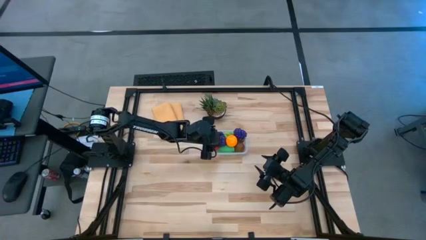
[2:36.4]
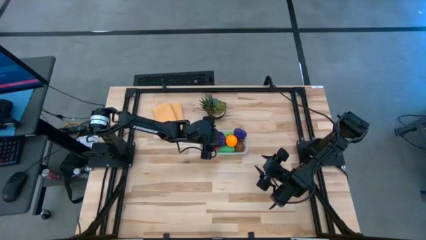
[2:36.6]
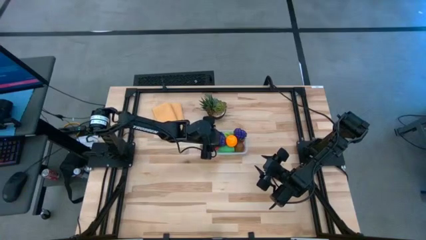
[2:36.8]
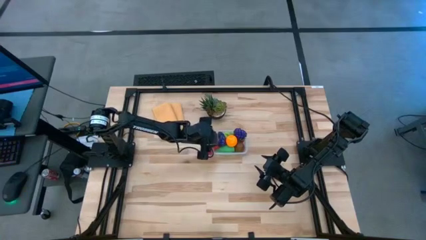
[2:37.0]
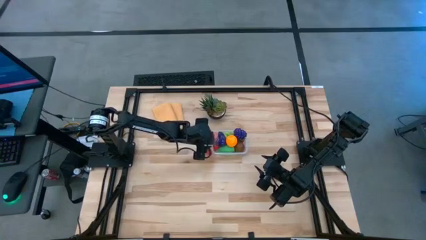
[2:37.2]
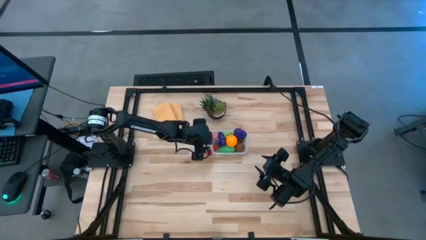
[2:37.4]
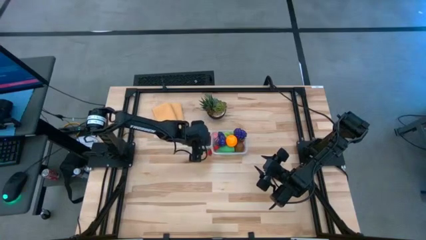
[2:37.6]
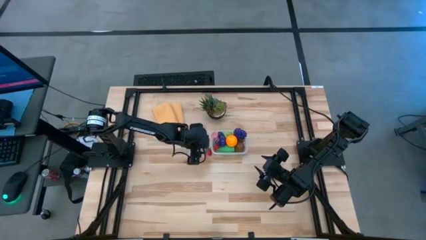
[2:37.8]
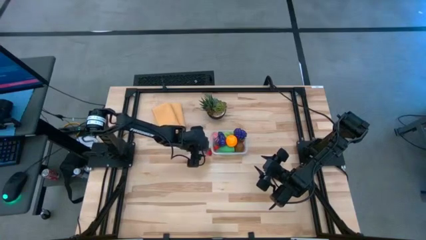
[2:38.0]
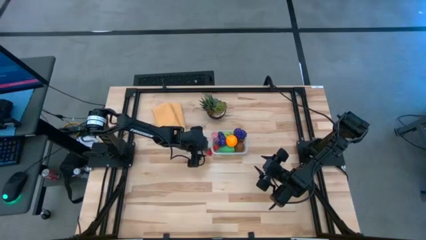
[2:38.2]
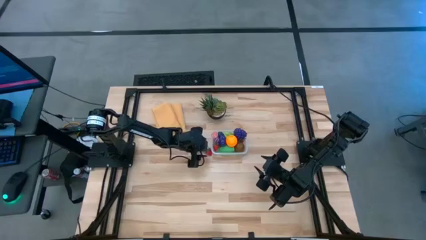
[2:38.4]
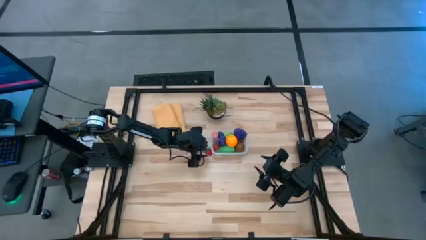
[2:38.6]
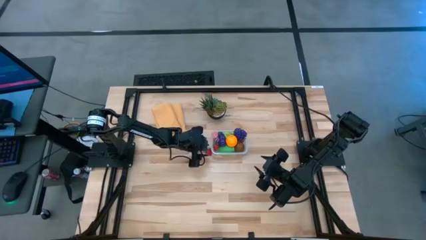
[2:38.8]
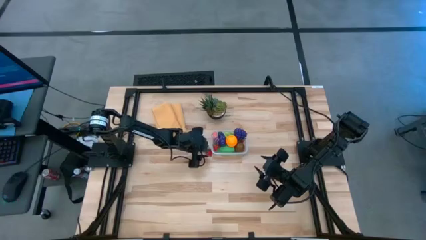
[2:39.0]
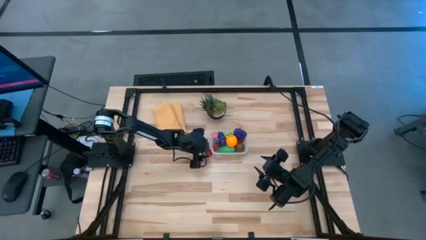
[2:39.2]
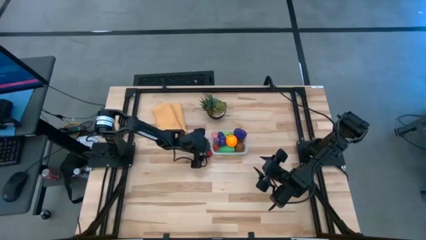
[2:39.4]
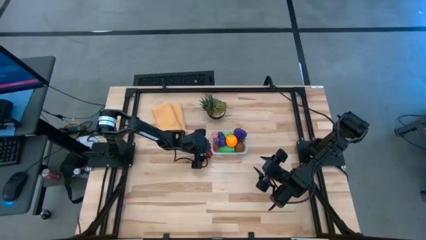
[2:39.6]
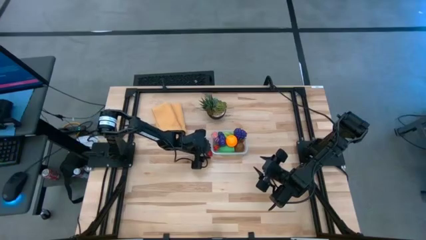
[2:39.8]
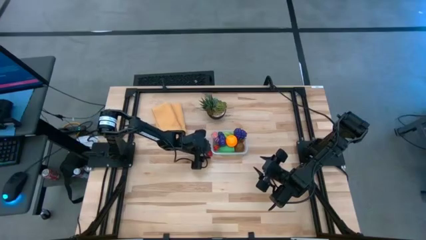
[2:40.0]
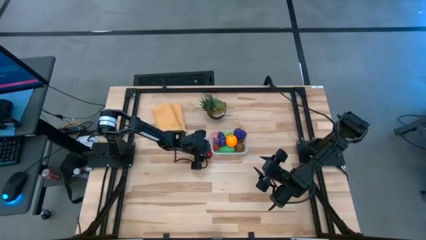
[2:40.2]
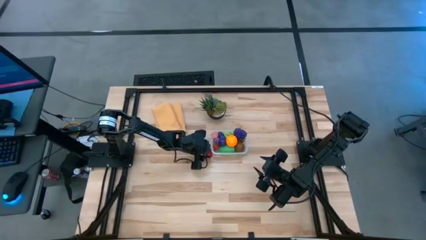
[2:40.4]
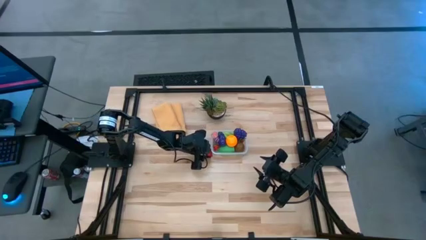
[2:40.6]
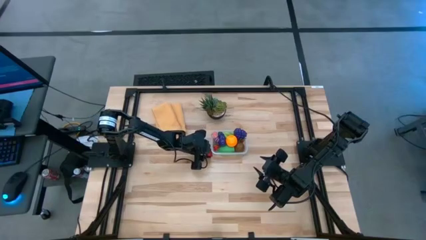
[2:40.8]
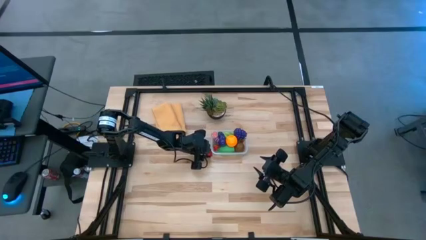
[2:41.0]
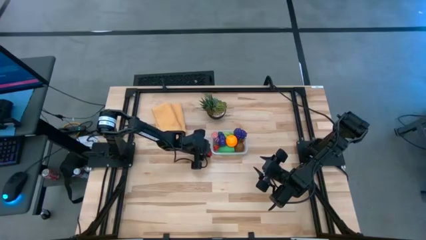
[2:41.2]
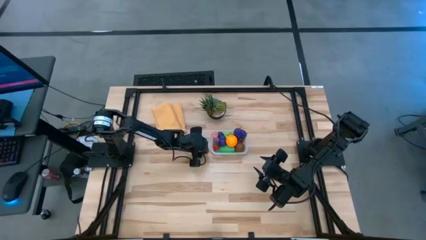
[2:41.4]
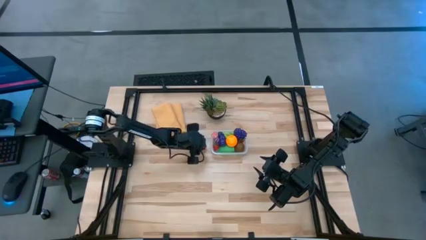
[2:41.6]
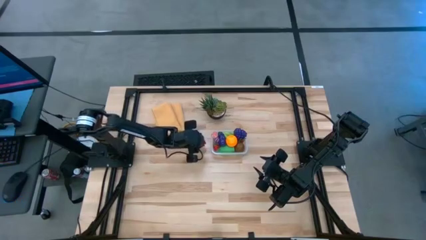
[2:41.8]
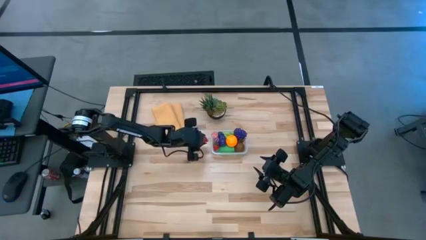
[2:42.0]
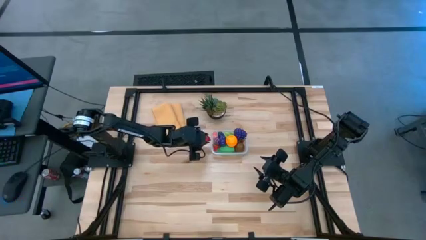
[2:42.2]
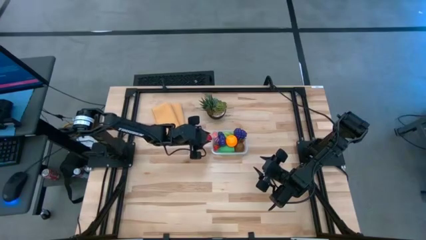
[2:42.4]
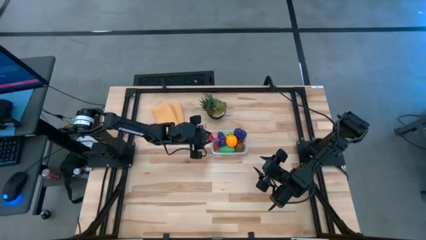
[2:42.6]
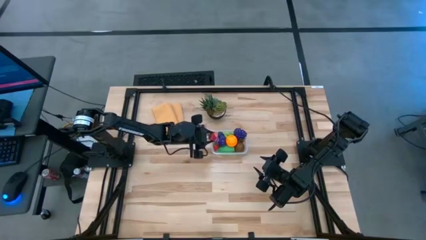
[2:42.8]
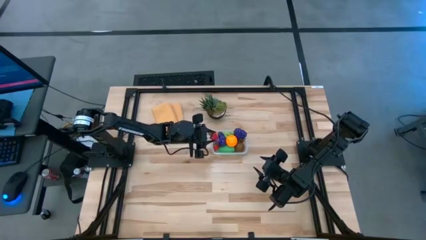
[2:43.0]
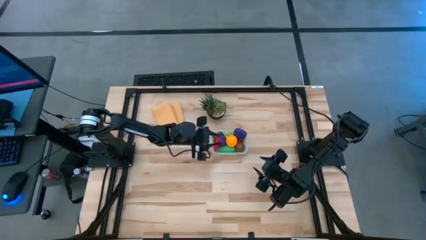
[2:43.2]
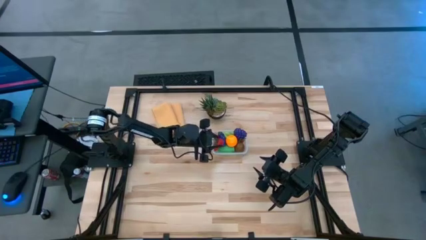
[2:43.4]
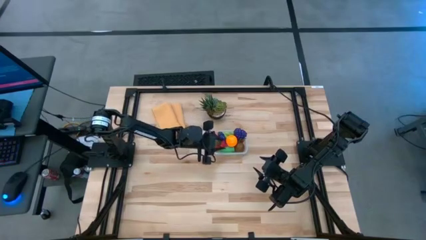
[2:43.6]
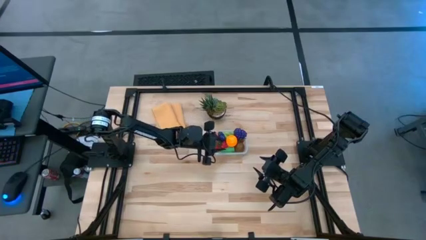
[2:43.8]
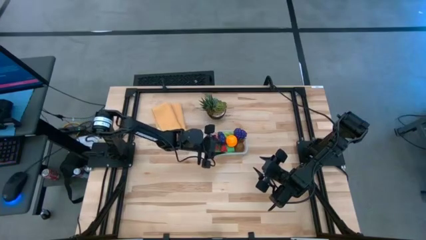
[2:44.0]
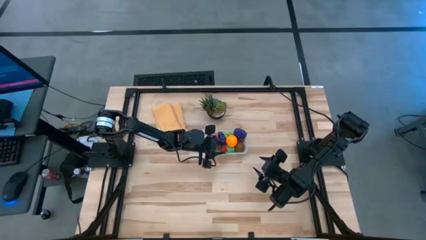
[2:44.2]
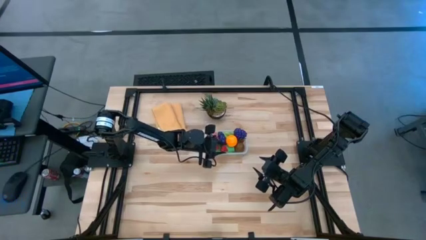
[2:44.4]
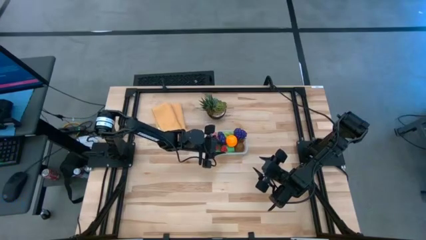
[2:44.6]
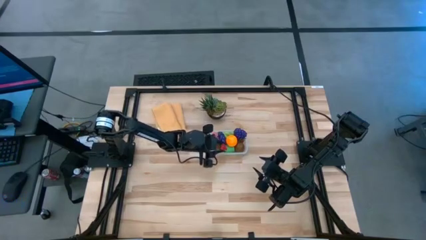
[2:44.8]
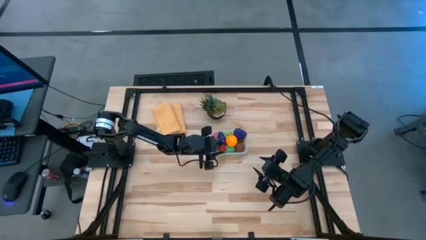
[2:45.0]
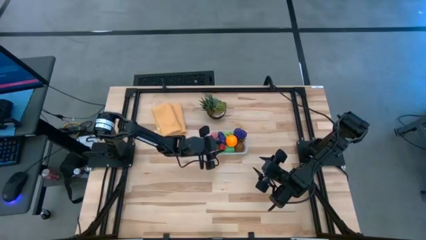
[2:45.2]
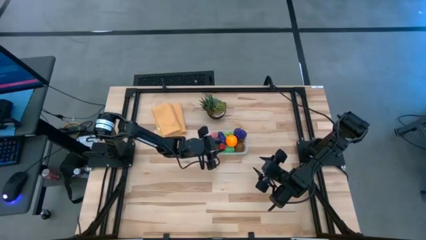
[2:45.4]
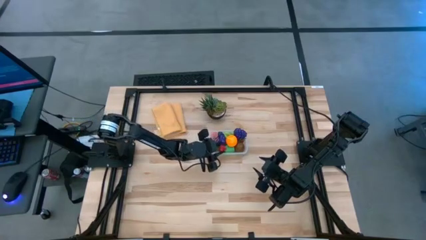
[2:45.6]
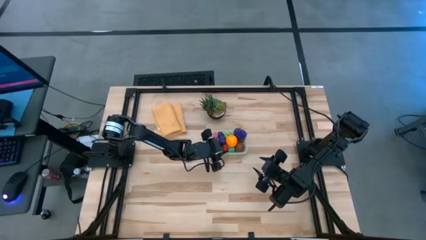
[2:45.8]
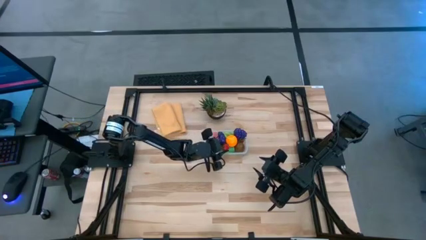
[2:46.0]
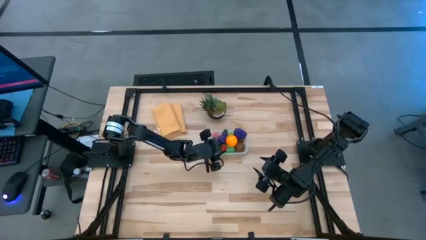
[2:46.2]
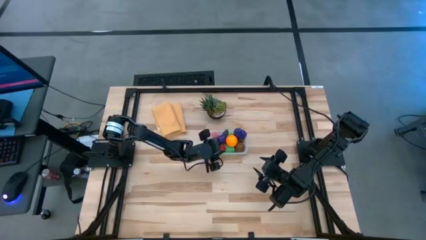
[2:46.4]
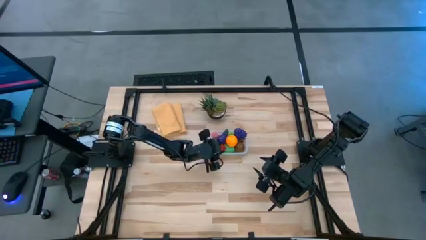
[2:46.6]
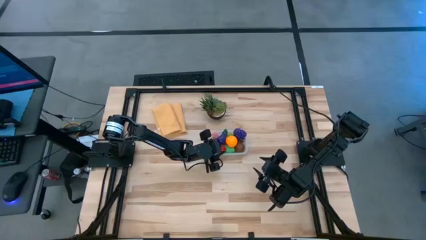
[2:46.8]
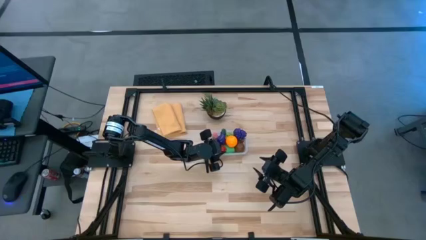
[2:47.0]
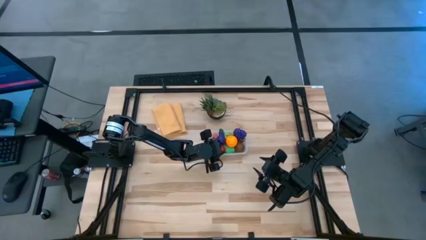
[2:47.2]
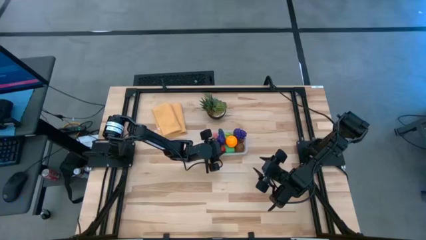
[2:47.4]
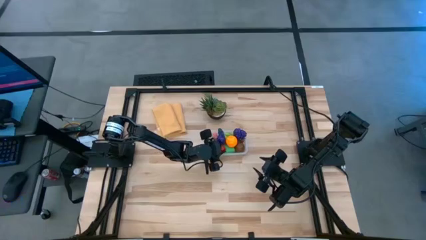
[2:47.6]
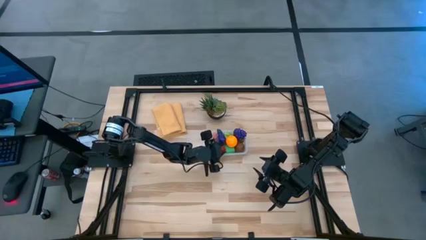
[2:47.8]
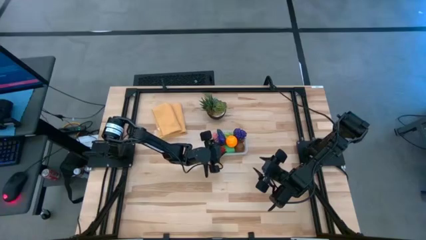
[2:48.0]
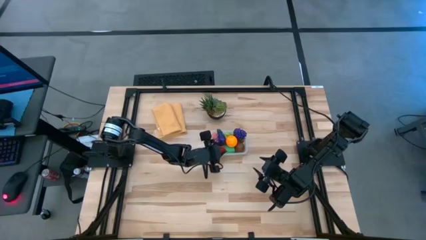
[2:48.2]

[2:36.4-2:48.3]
Task: Pick and placing Produce into tupperware
Put the red strawberry into the transparent container

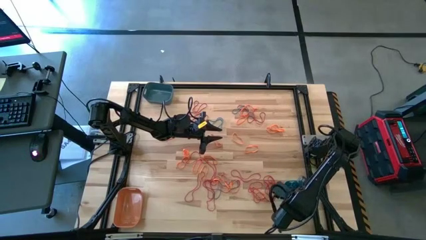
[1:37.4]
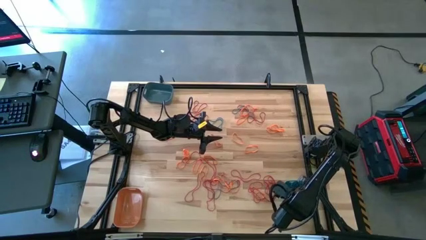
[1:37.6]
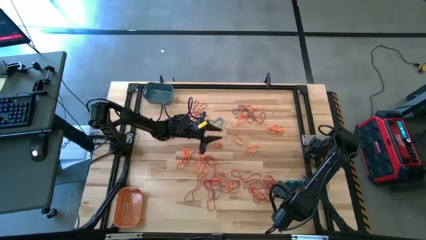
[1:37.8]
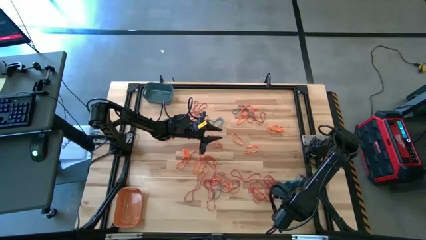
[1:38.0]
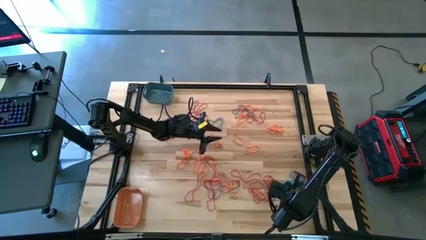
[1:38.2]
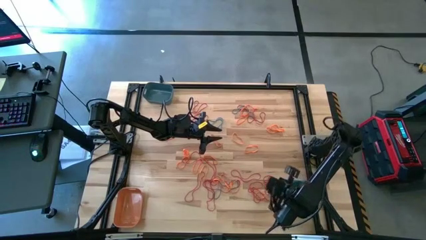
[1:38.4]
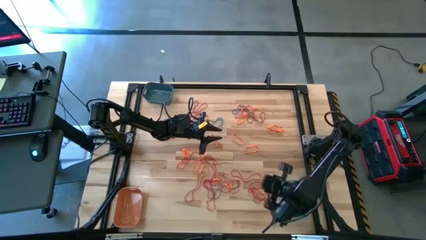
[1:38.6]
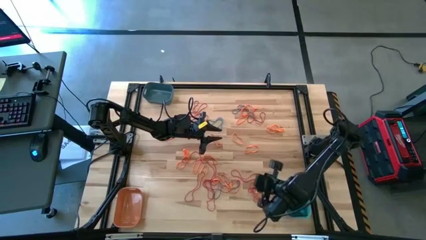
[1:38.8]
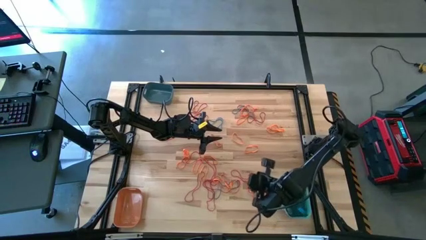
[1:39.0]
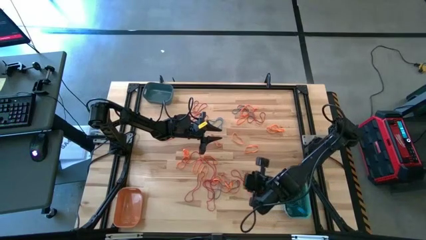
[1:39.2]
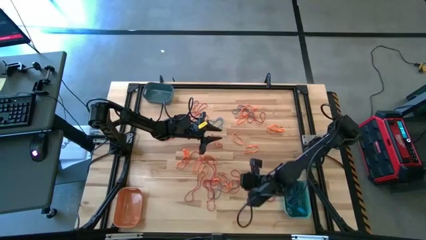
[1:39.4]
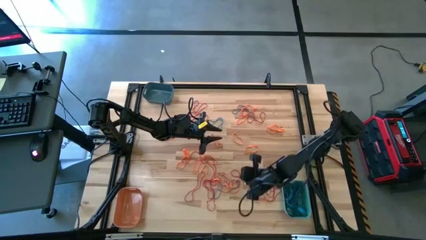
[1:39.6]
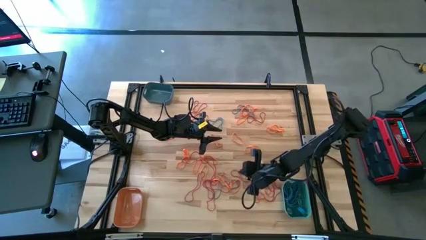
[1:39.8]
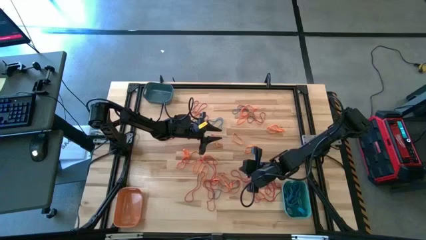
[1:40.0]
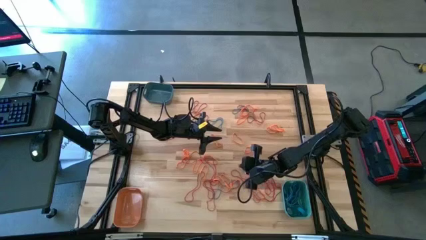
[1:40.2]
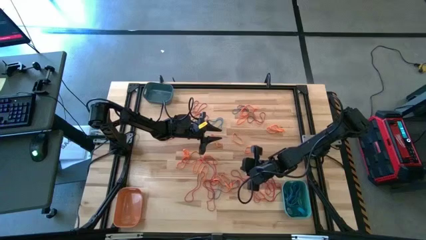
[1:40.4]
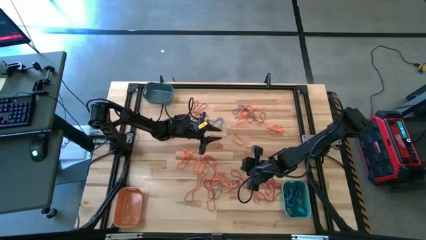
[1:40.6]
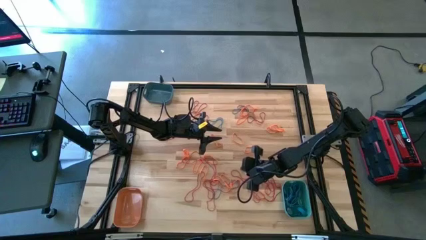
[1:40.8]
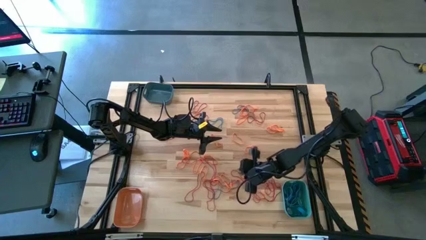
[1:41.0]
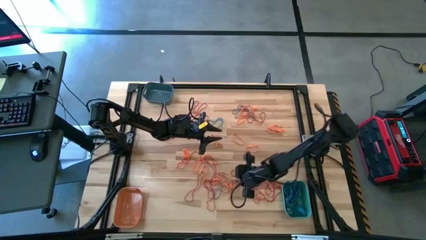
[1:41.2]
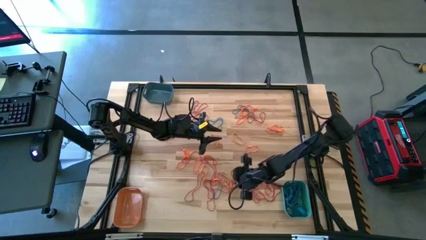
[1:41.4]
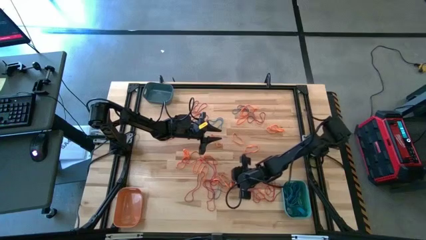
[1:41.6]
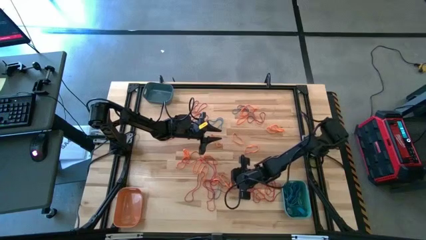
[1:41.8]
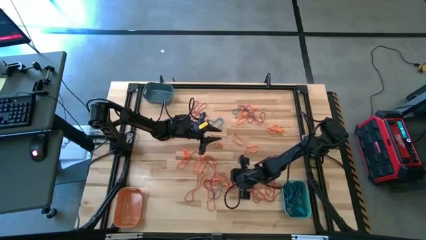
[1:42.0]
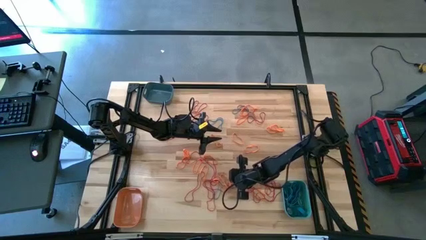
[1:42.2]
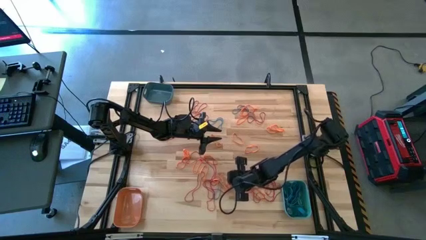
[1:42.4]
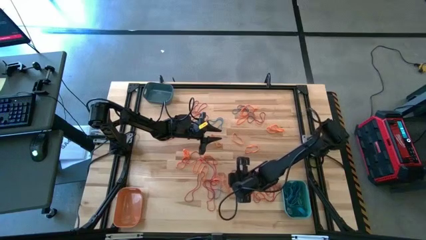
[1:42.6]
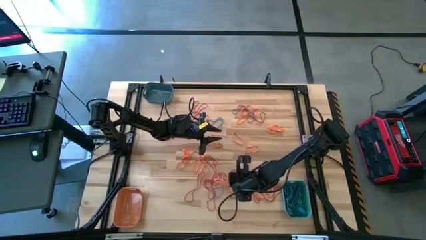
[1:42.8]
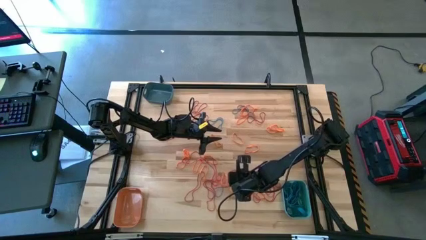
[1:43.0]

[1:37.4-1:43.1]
Task: Sort rubber bands into baskets
Put the blue rubber band into the light blue bin

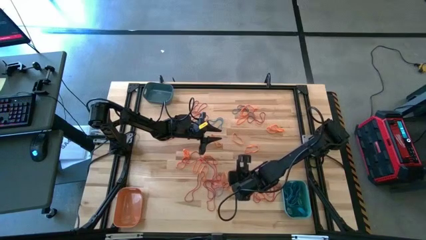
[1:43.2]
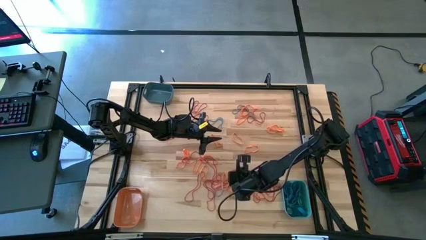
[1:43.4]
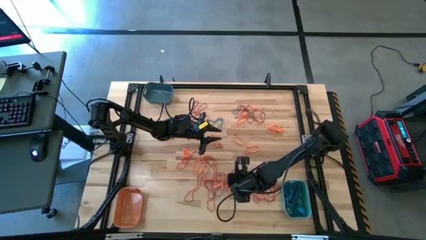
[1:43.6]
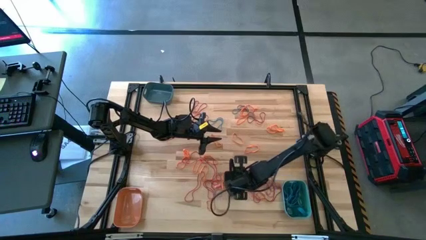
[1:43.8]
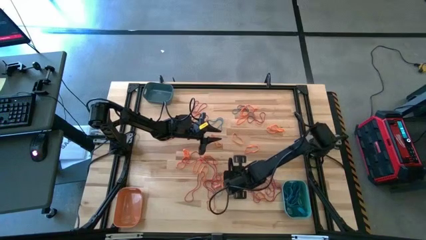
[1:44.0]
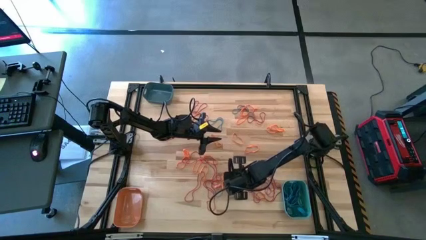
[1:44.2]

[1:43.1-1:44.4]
Put the blue rubber band into the light blue bin
